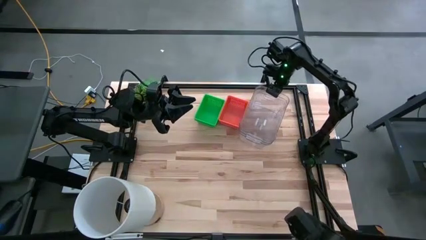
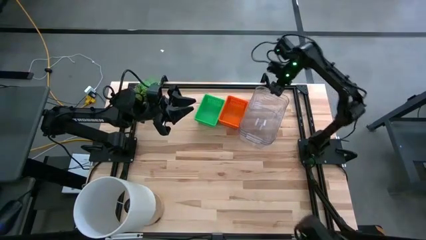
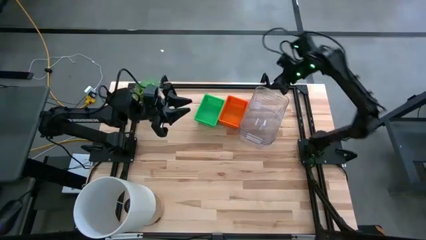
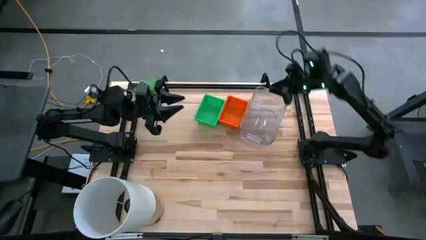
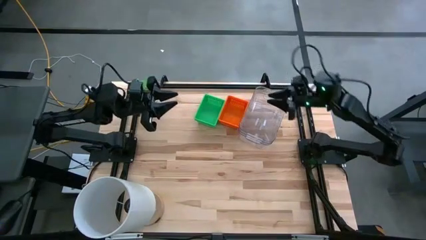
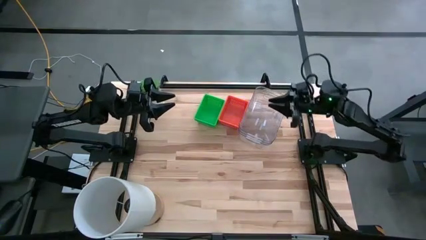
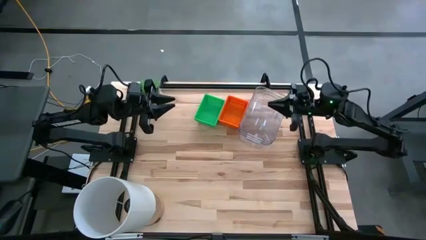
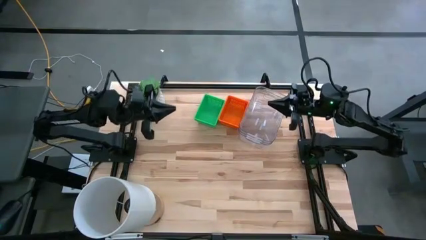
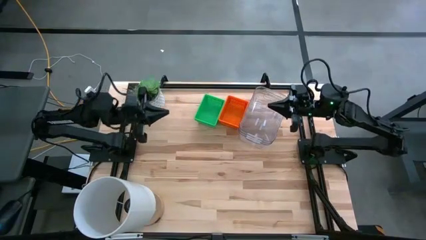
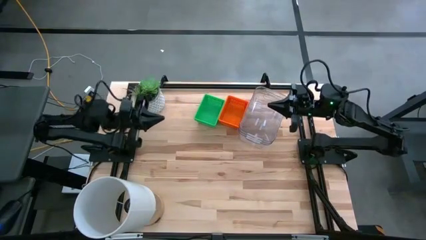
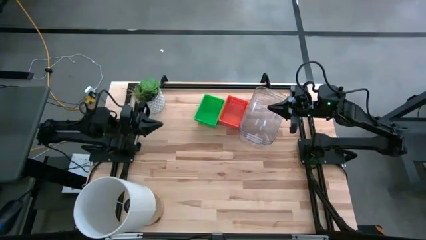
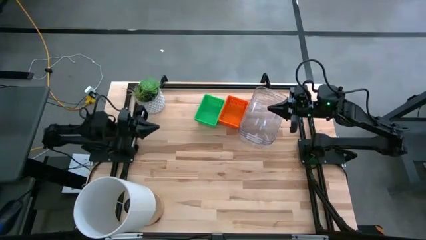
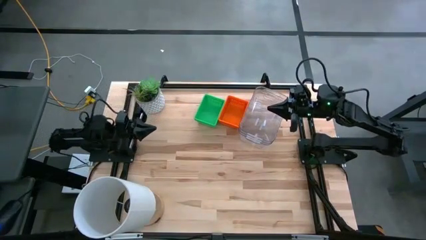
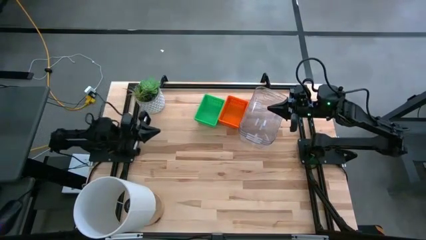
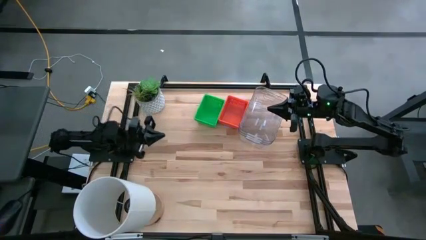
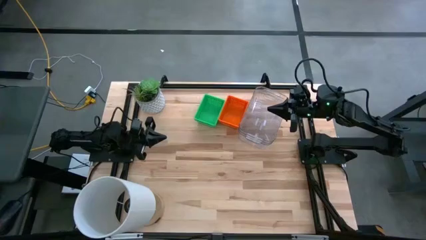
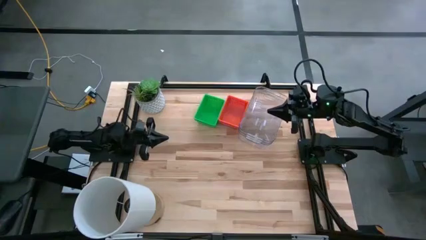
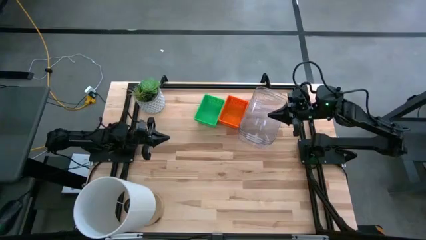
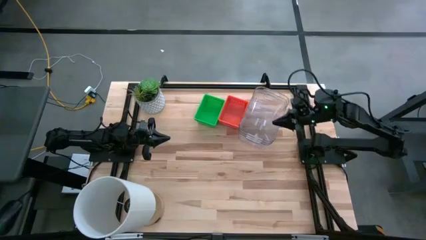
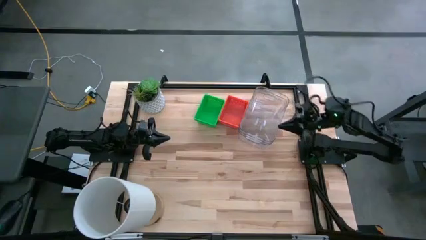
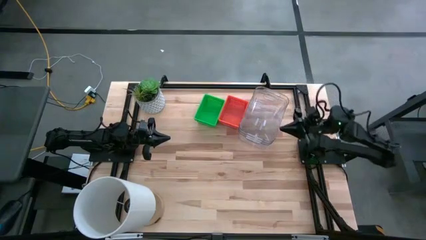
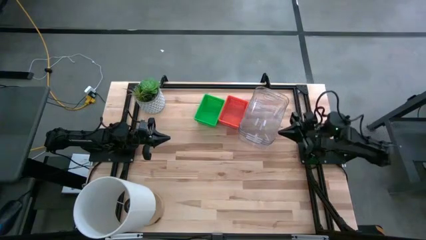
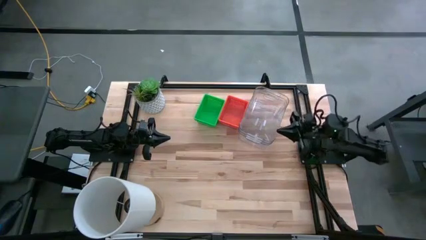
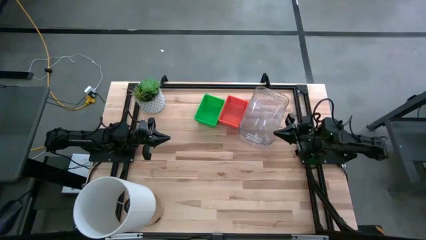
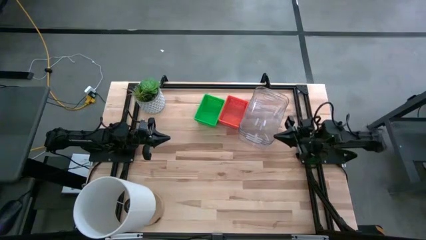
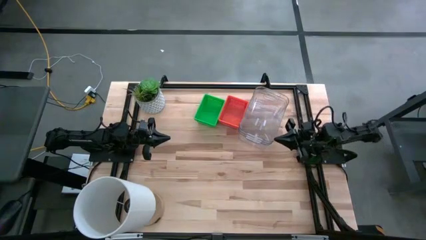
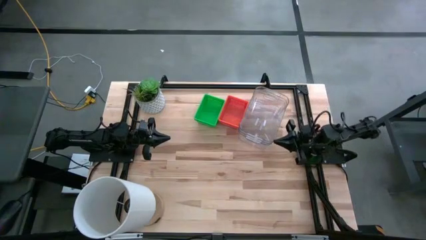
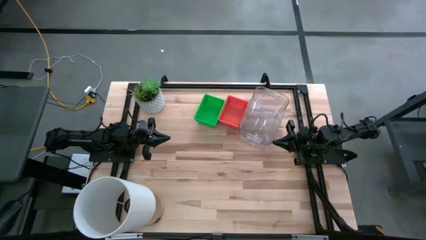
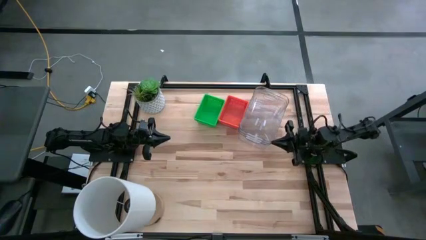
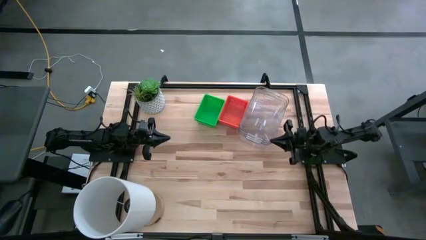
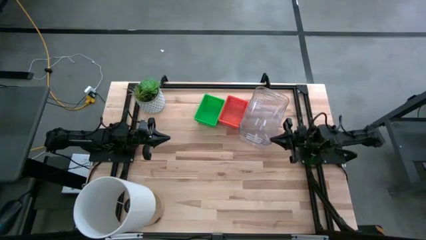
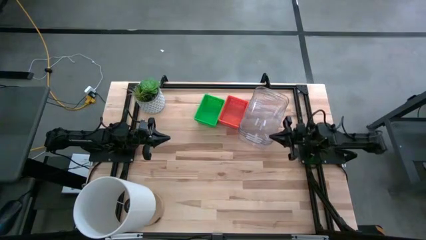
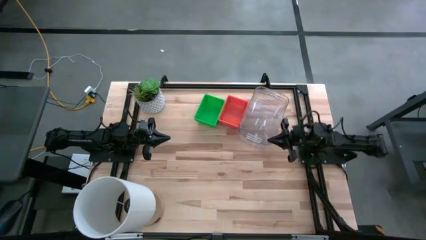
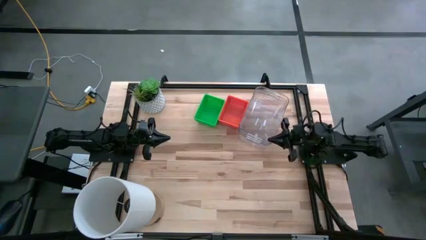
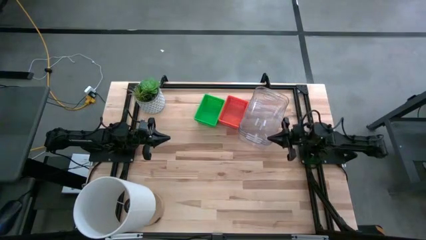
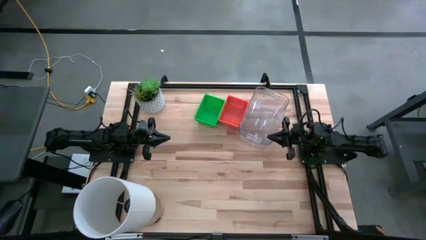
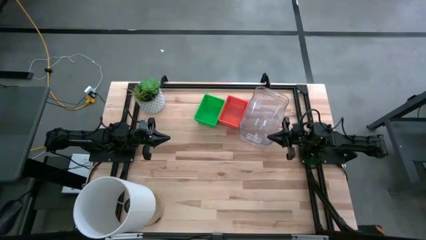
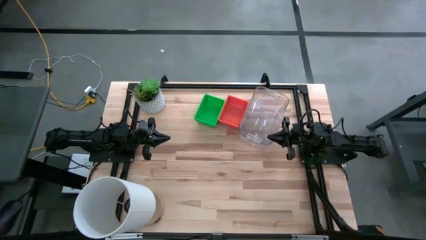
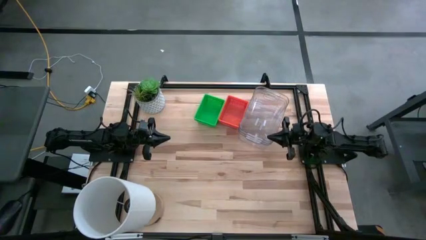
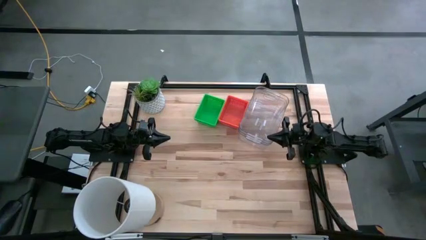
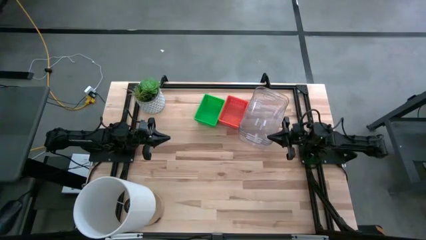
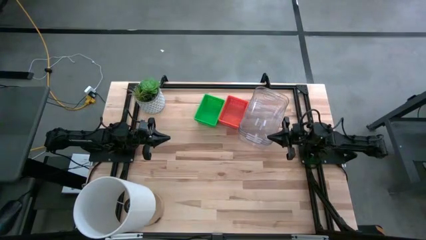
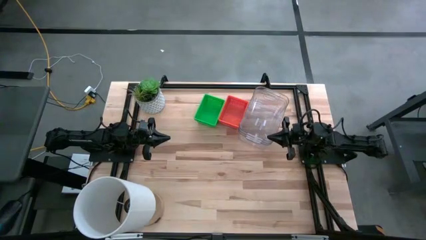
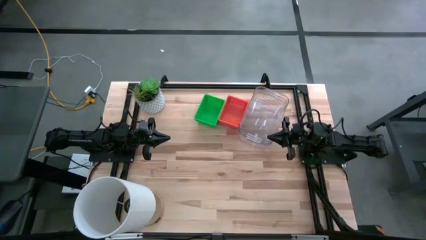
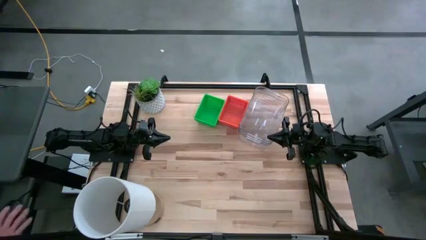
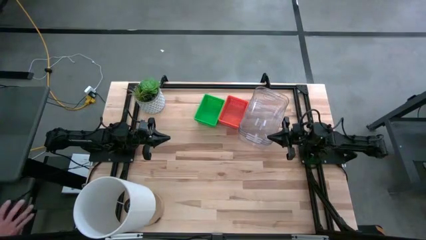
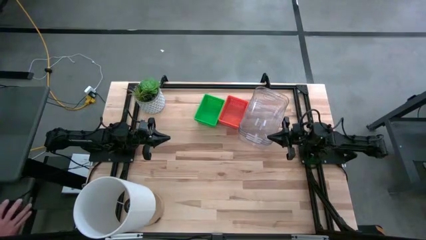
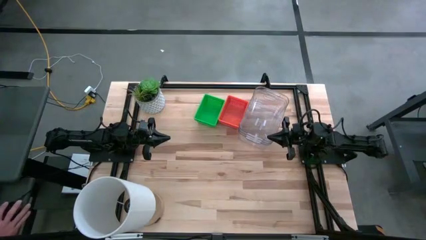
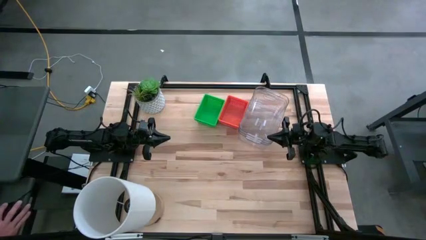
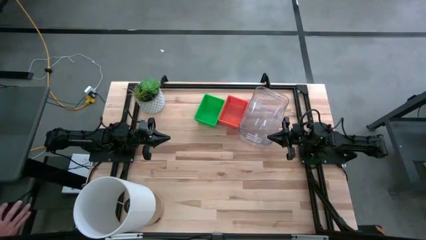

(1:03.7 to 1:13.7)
Return to Home Position
